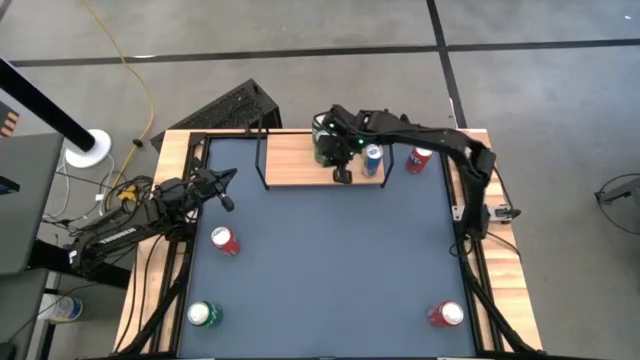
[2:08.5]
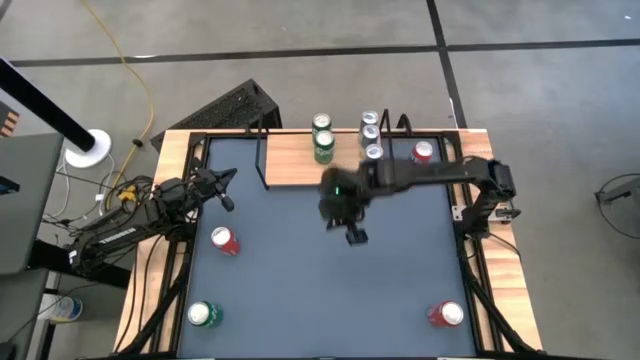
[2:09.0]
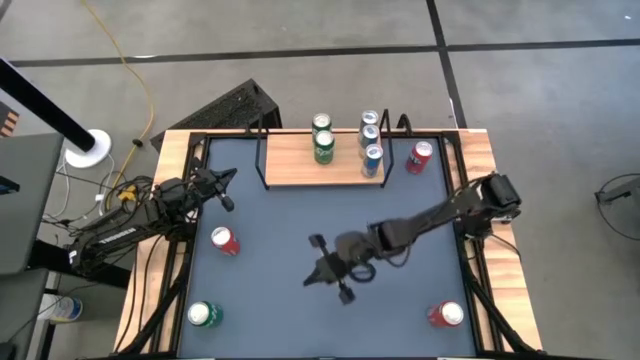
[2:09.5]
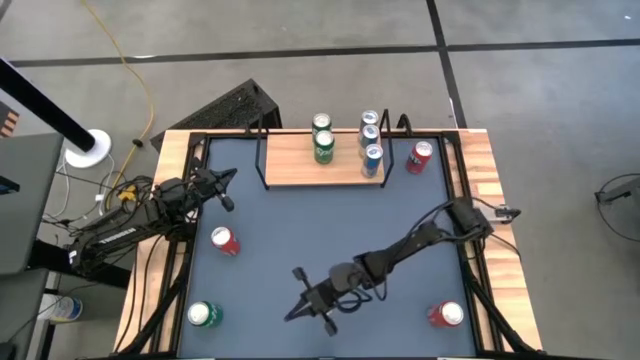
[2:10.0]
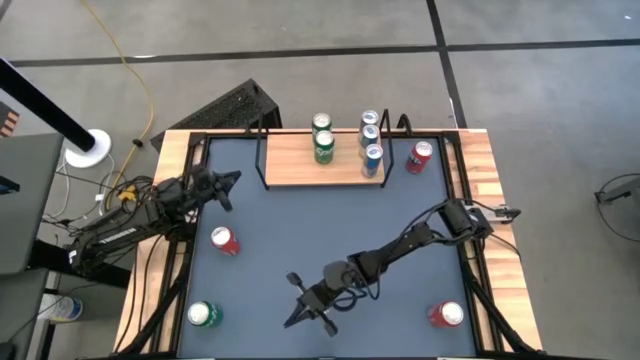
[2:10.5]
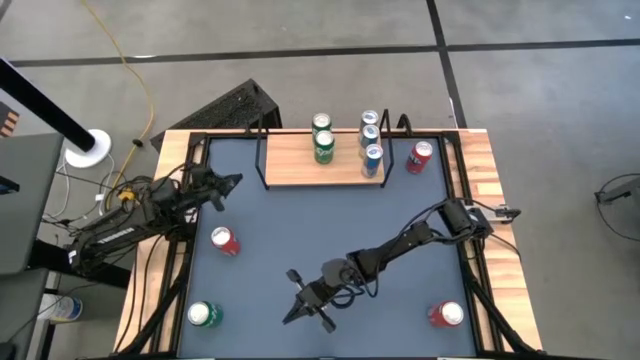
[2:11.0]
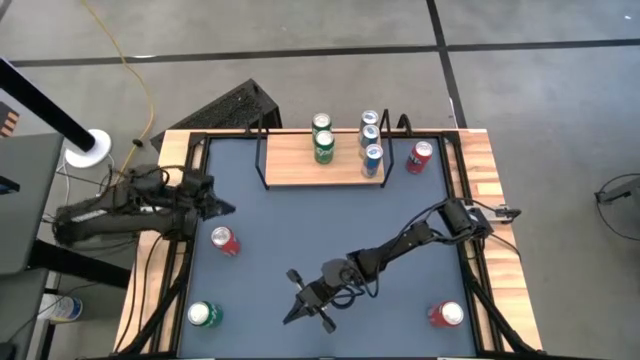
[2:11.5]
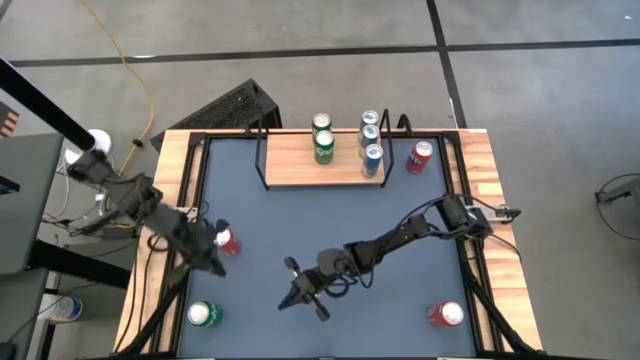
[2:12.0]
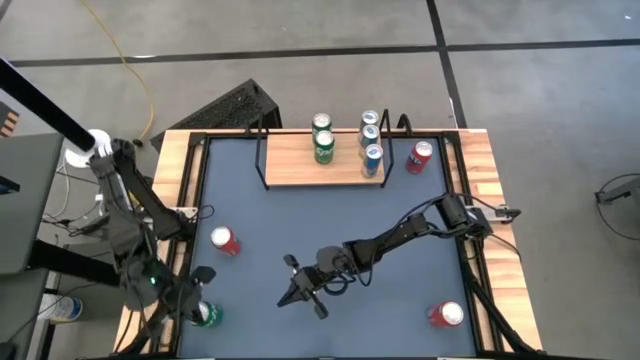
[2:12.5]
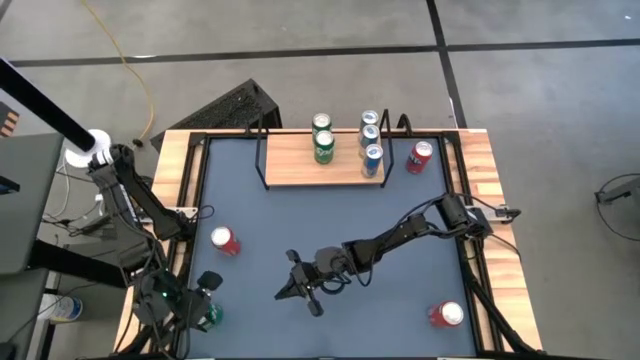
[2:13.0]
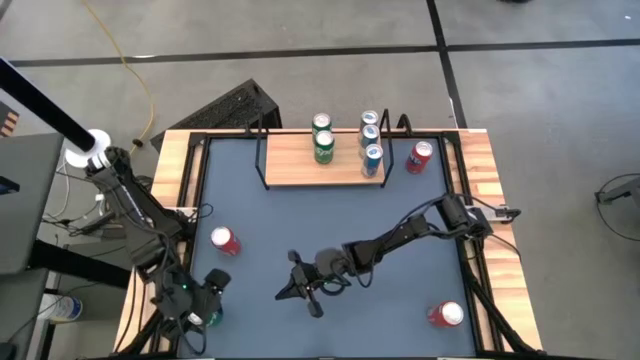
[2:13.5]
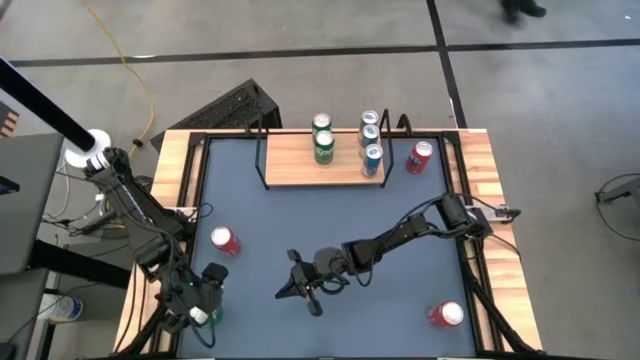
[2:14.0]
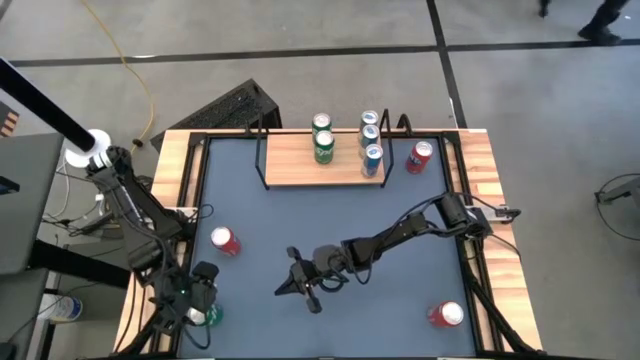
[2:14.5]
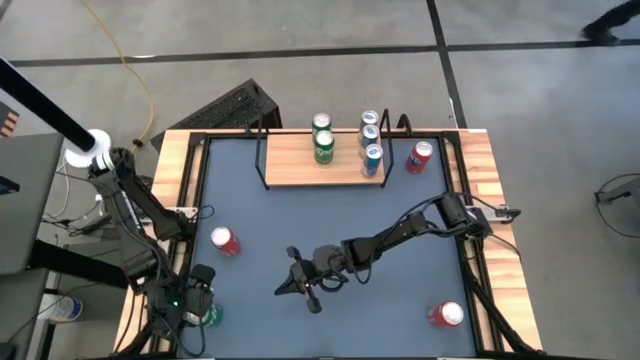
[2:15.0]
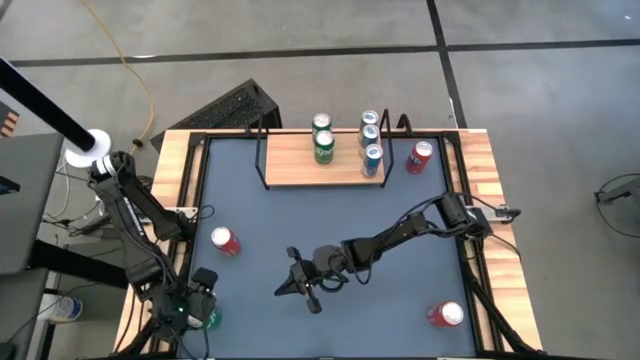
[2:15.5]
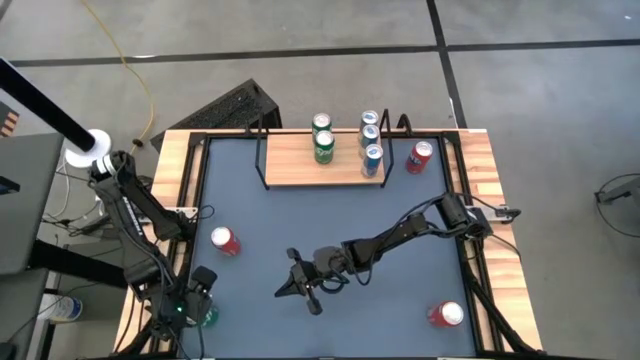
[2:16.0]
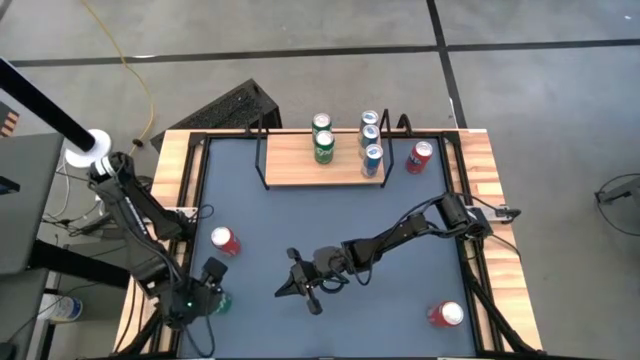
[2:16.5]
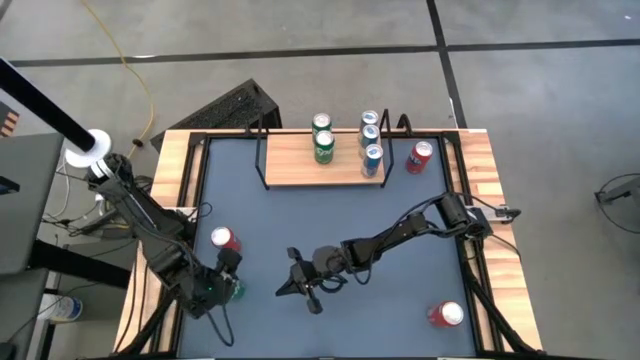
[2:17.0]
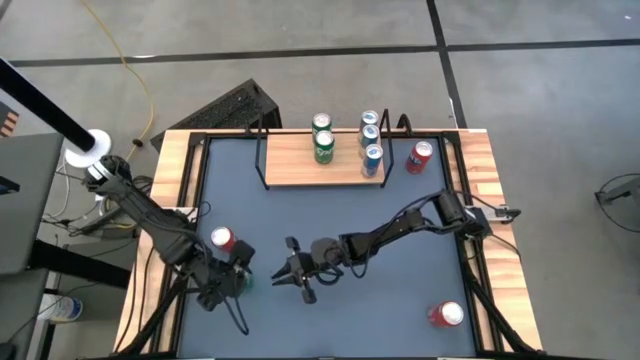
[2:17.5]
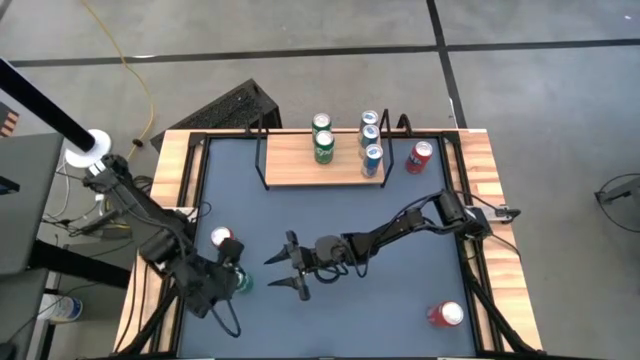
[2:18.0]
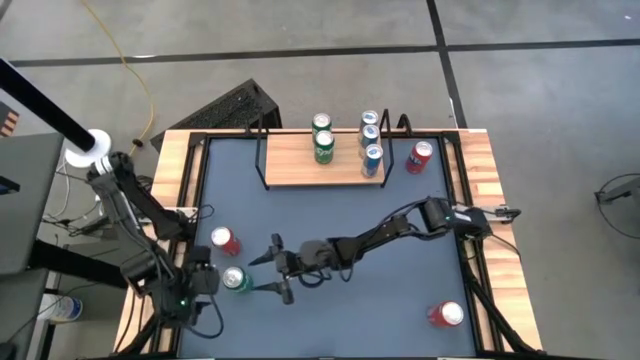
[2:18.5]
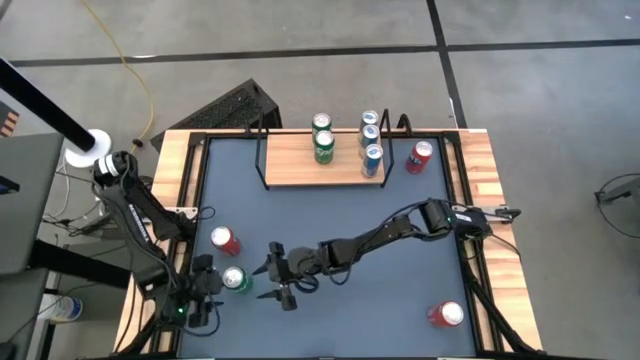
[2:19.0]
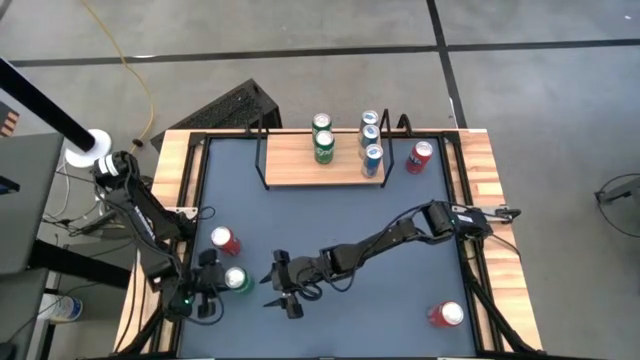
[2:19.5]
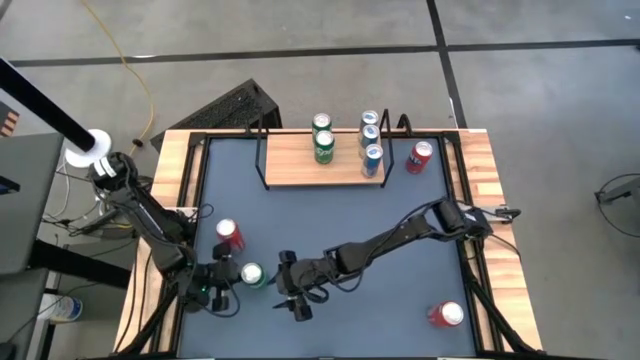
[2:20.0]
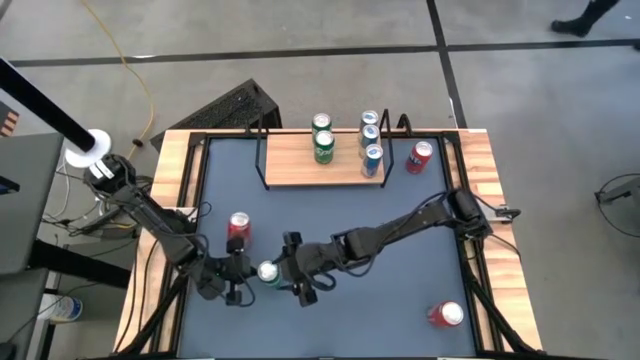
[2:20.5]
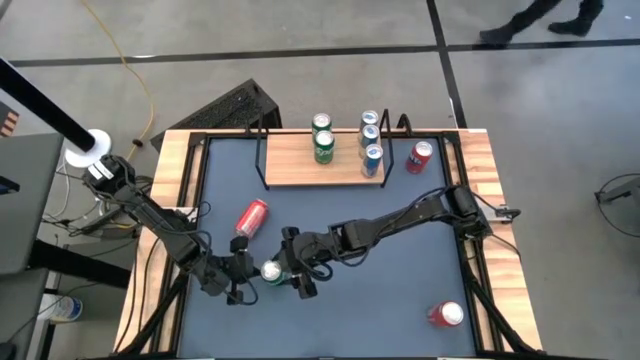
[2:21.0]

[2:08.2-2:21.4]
Task: Place canned beverage on shelf
Move the green soda can to the middle left of the table

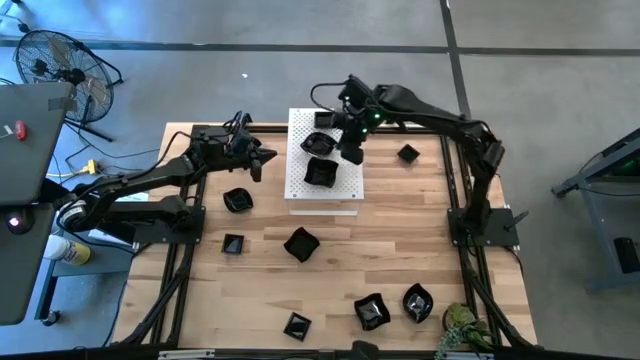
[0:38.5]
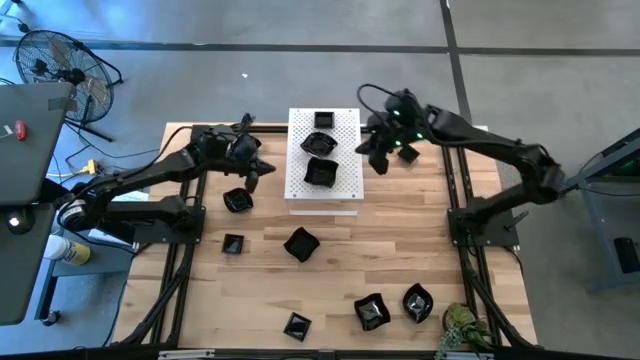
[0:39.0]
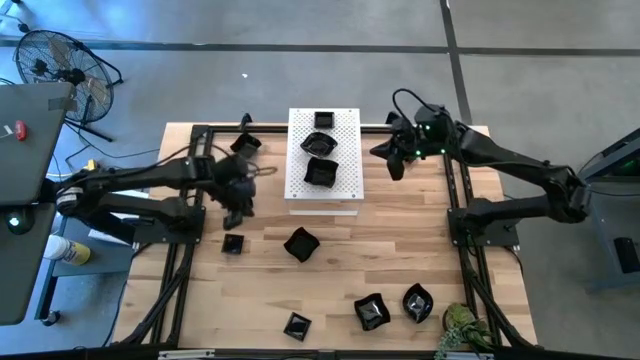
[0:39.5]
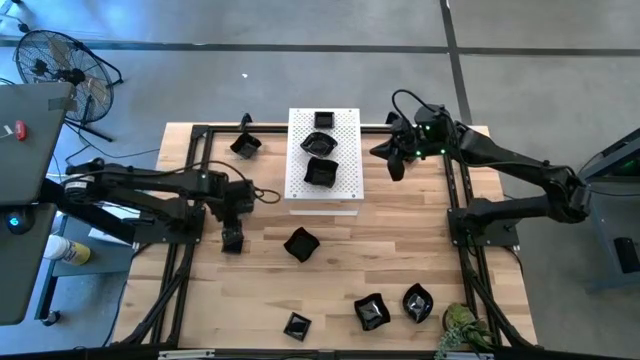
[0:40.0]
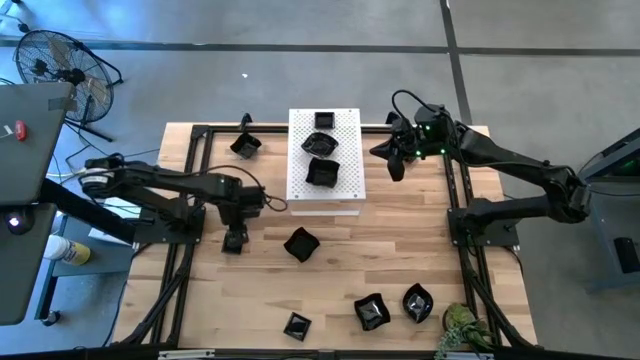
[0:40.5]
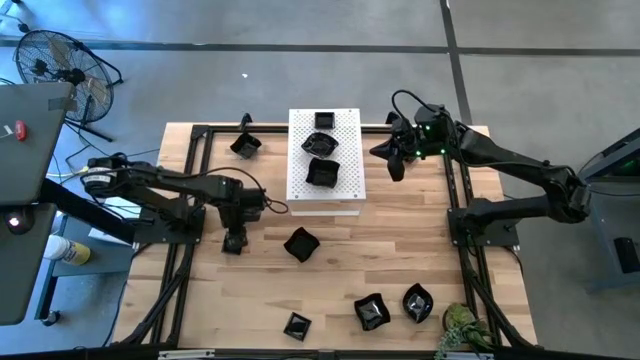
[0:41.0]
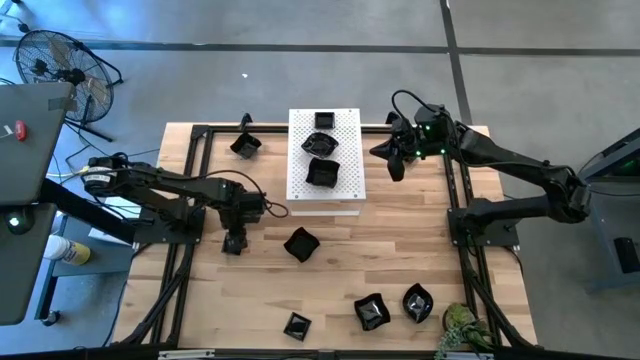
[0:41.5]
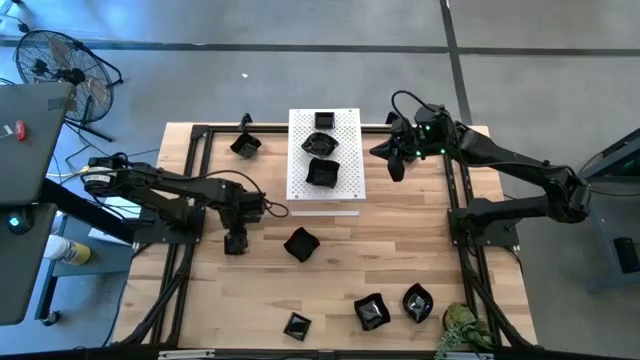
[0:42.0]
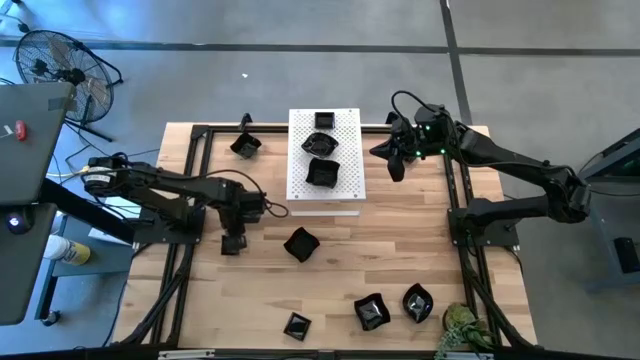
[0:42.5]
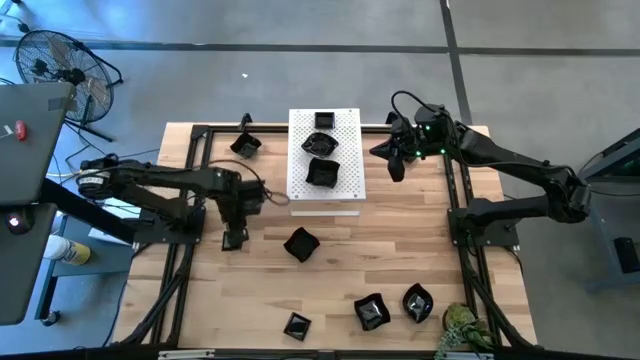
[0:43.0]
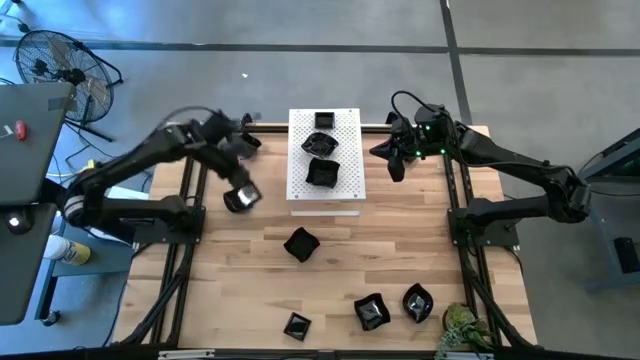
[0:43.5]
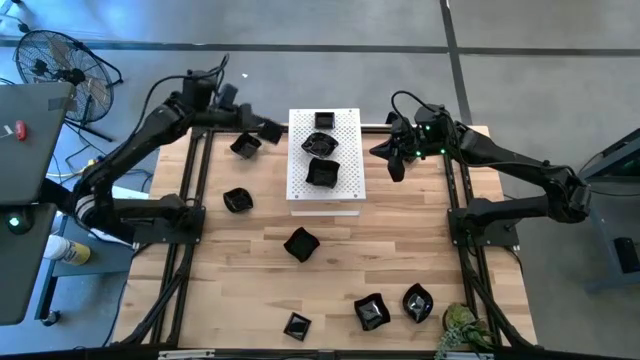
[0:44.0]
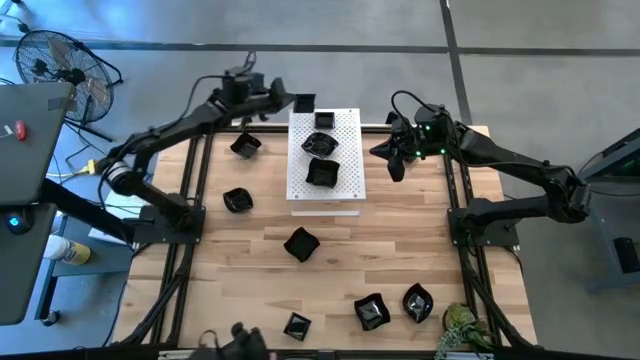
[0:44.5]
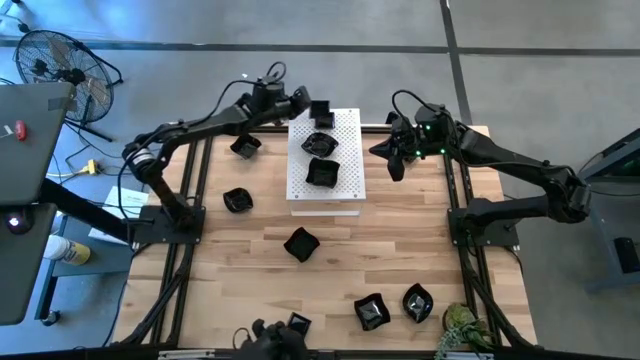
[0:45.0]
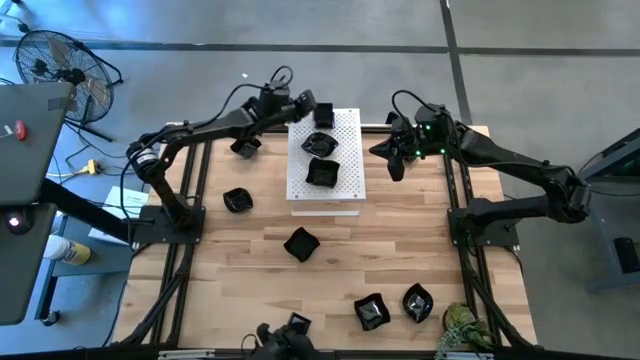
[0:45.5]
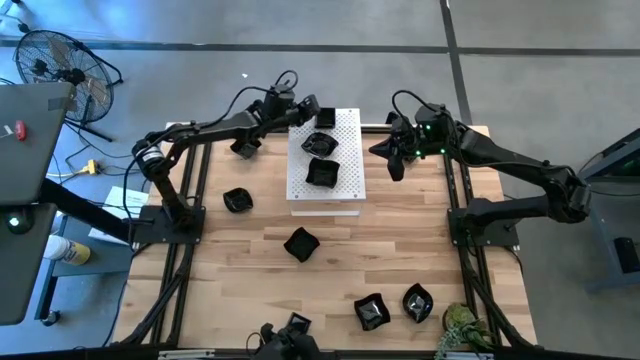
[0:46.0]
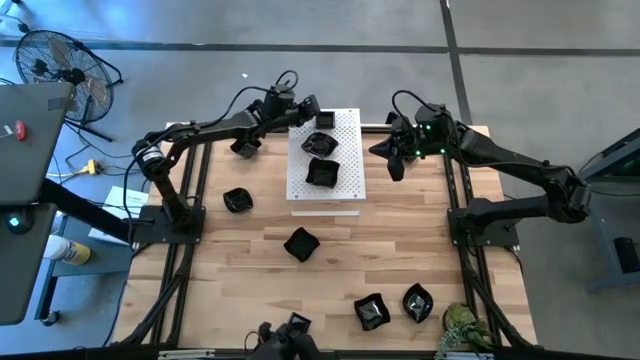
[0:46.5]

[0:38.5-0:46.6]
Task: Pick & Place Mini shaped plates
Stack the square plate on top of the square plate on the shelf
